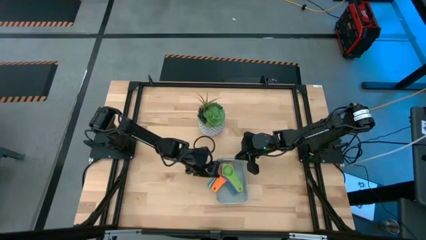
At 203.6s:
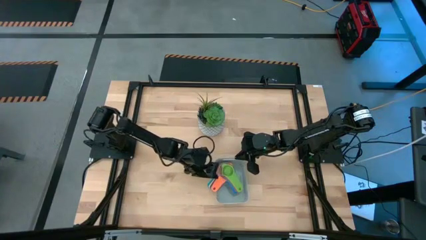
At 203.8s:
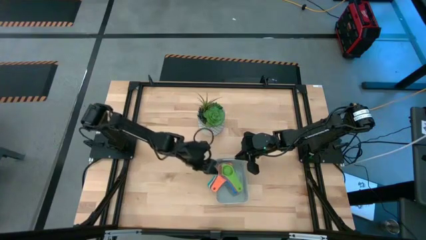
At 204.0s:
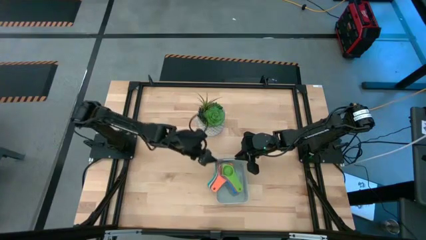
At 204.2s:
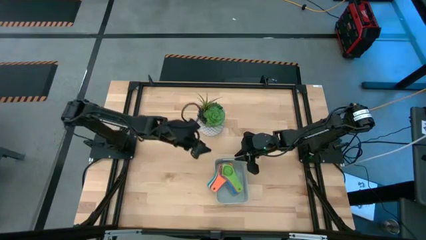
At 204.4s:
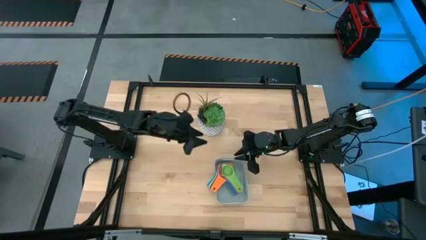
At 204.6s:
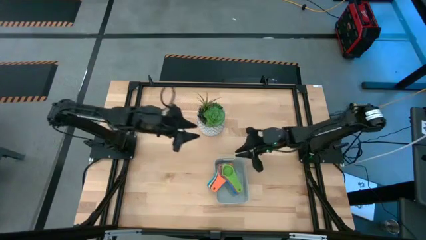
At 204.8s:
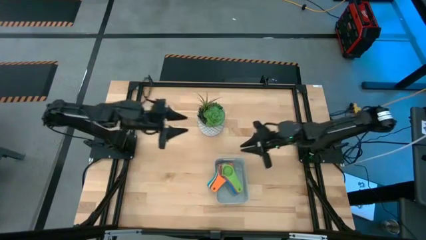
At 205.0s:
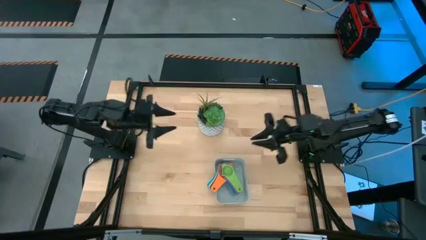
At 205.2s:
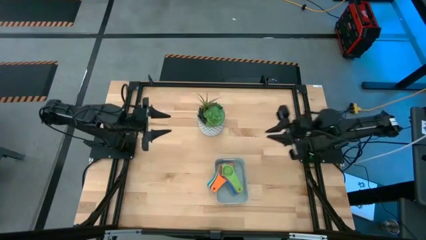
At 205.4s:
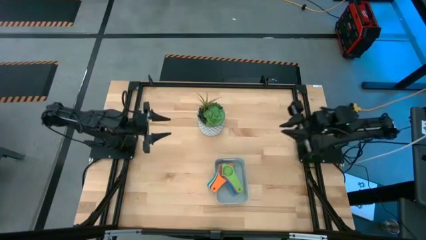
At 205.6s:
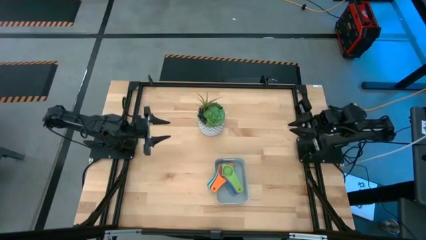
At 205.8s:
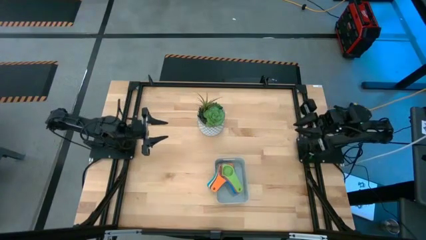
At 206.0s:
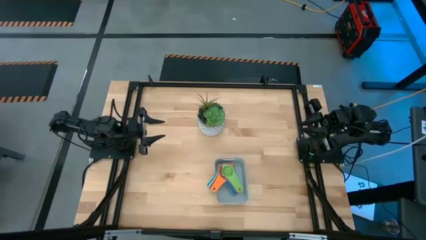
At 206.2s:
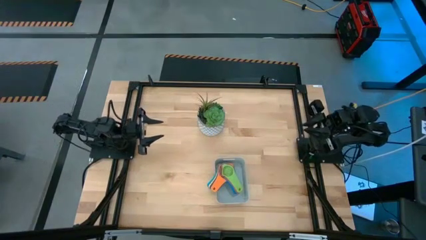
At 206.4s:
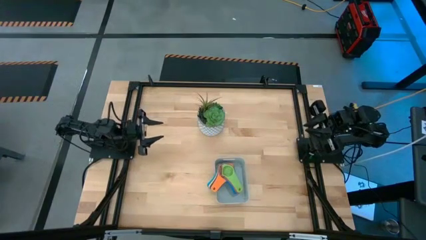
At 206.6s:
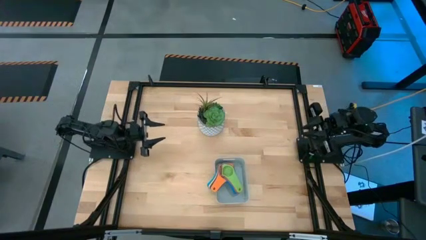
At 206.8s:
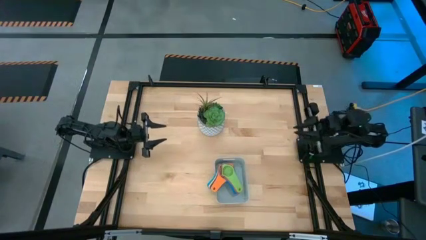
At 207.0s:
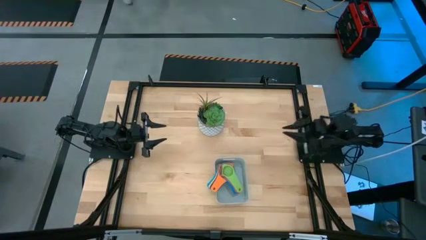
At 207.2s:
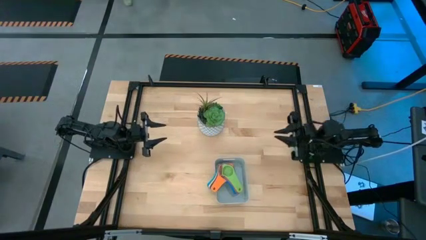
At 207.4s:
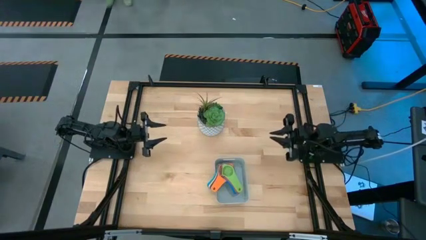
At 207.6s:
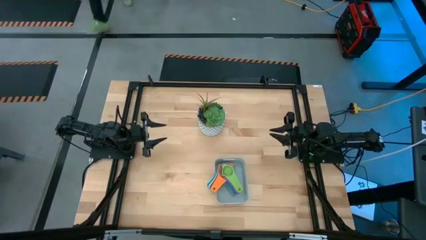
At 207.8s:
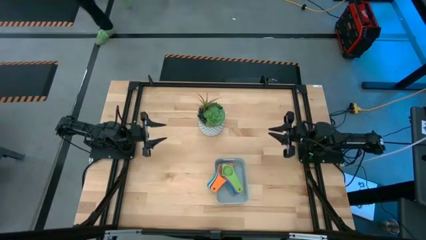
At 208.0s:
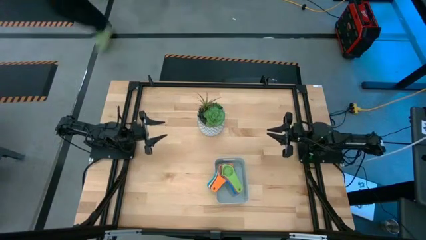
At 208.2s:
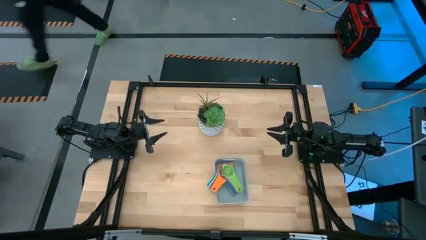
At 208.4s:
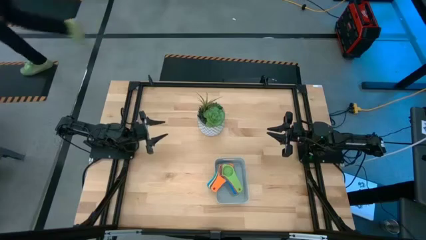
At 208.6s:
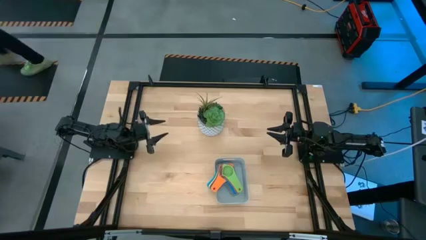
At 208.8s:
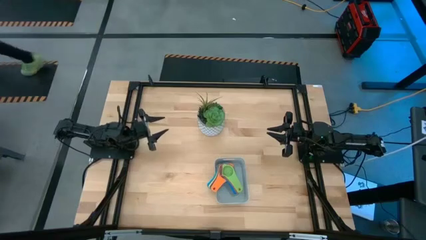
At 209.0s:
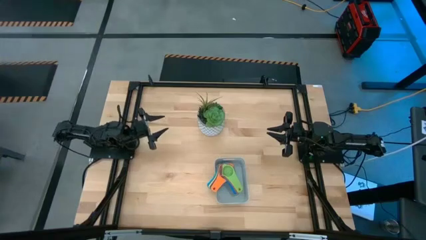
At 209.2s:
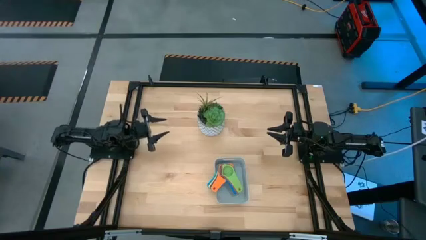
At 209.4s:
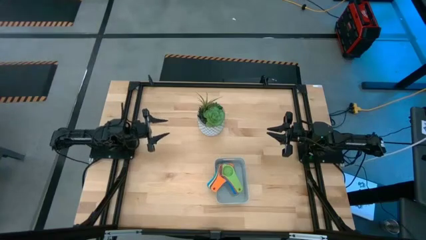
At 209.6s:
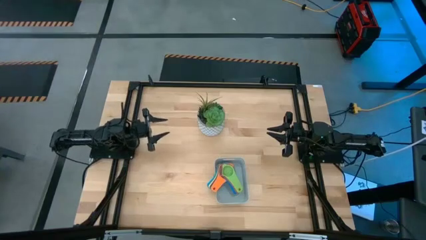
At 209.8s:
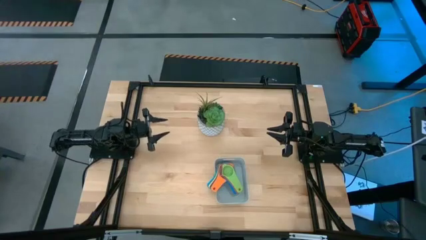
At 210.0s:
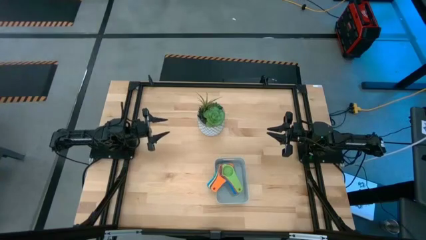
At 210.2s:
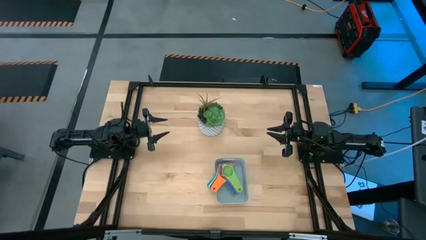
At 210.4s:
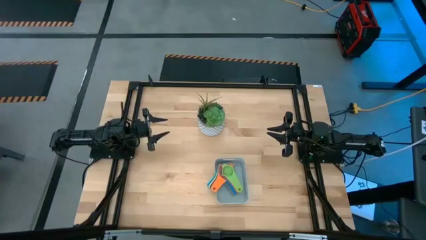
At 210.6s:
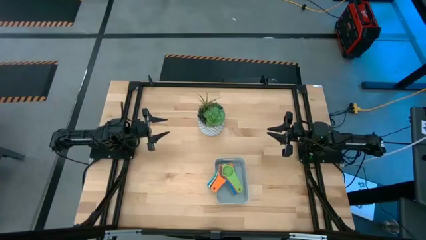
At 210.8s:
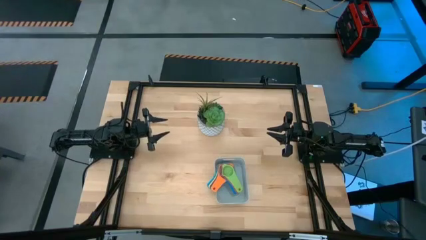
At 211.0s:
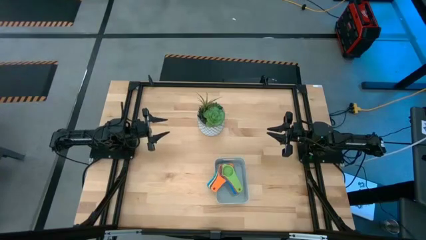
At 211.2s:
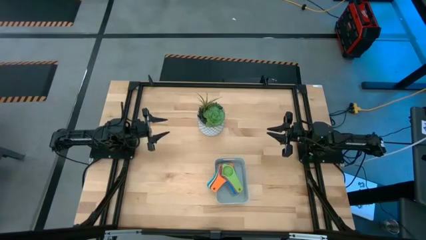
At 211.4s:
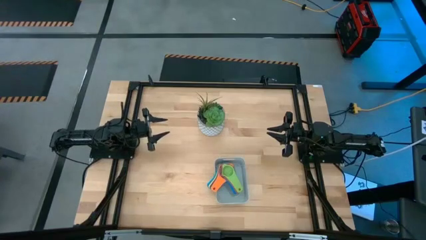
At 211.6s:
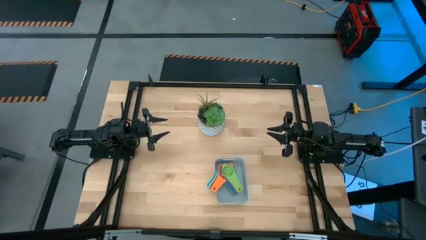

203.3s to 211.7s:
Task: Nest measuring cups in basket
Return to Home Position

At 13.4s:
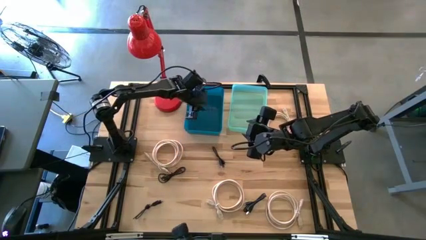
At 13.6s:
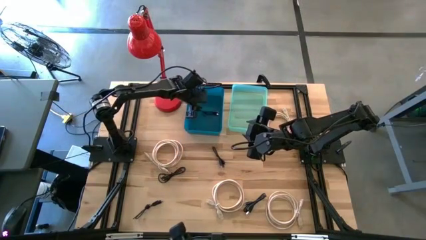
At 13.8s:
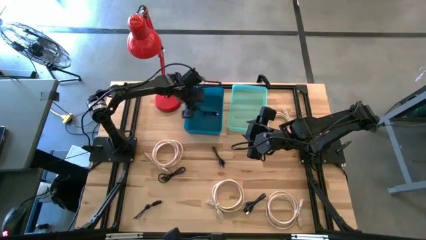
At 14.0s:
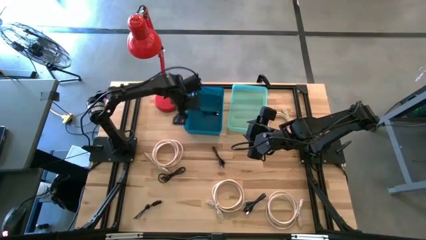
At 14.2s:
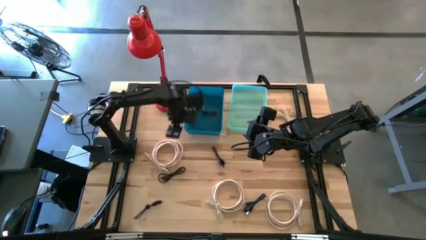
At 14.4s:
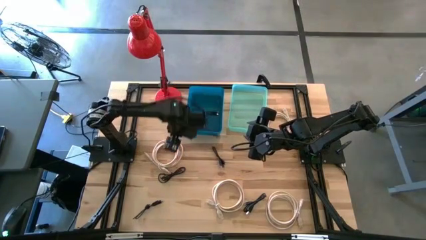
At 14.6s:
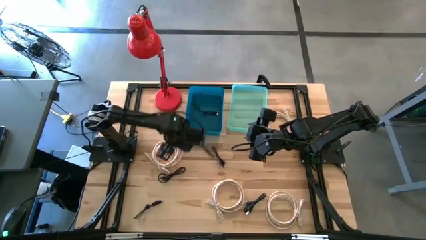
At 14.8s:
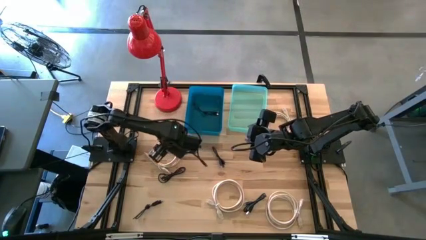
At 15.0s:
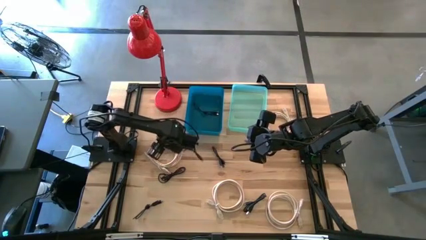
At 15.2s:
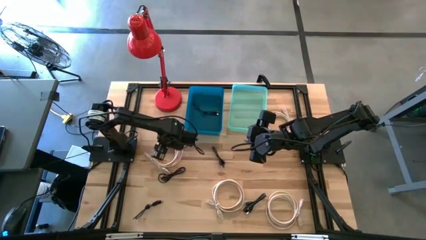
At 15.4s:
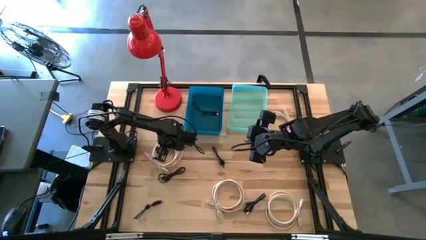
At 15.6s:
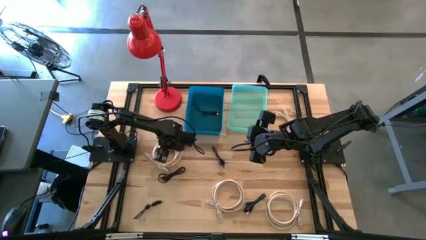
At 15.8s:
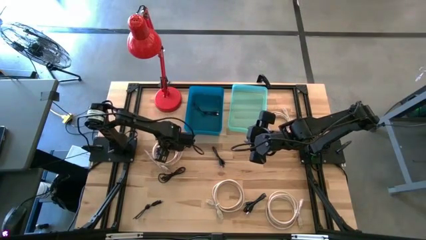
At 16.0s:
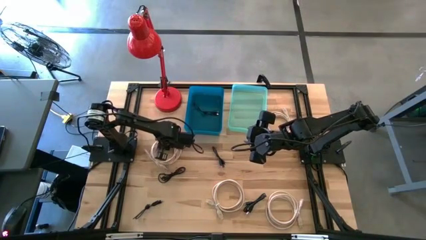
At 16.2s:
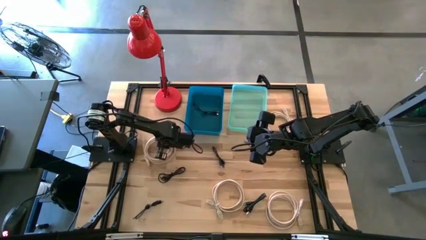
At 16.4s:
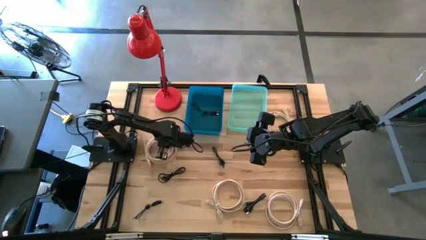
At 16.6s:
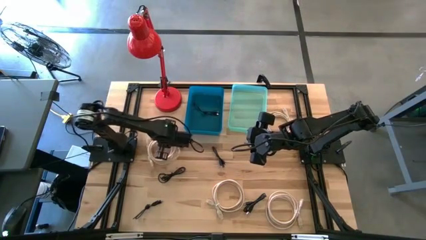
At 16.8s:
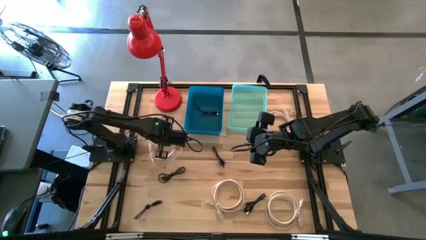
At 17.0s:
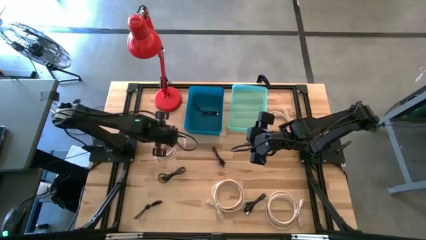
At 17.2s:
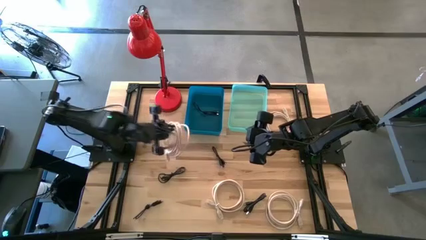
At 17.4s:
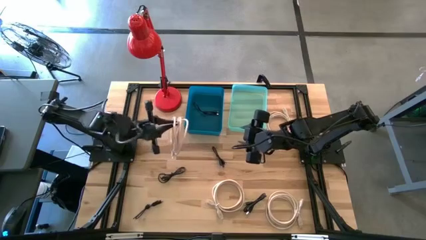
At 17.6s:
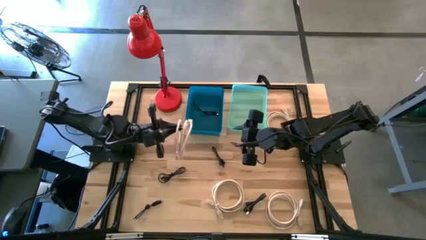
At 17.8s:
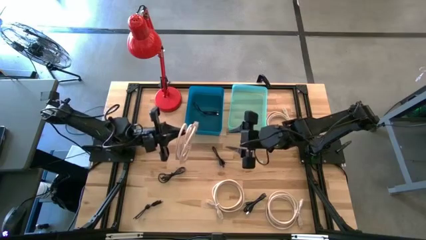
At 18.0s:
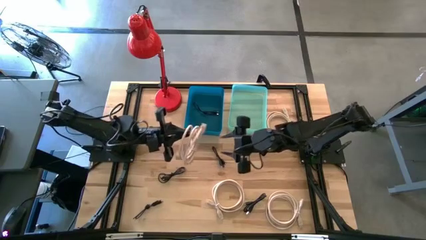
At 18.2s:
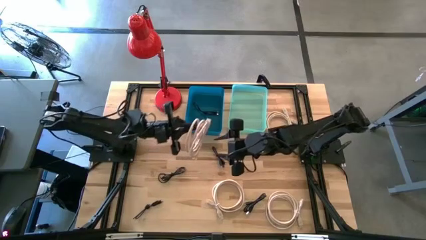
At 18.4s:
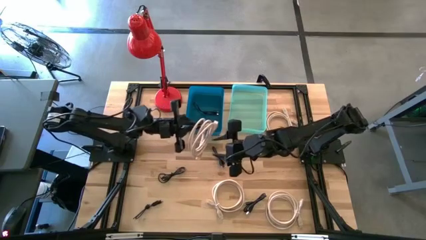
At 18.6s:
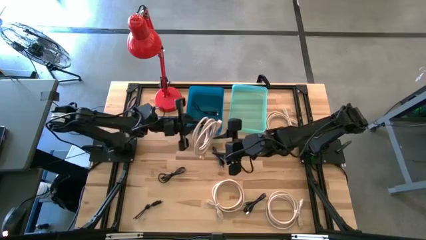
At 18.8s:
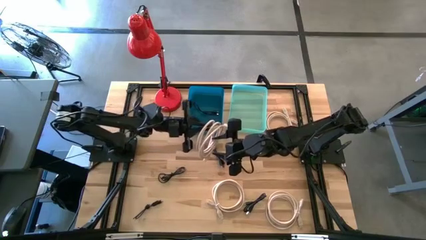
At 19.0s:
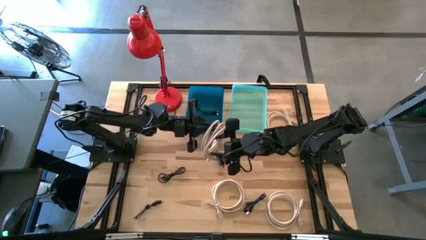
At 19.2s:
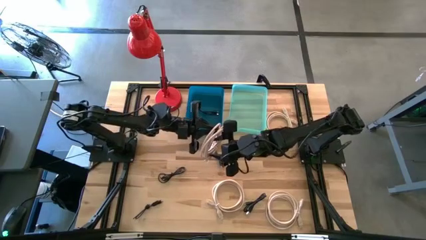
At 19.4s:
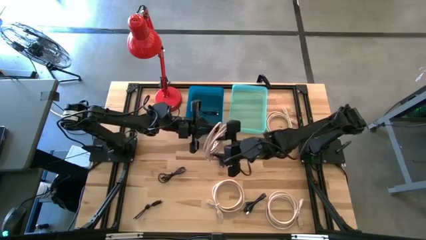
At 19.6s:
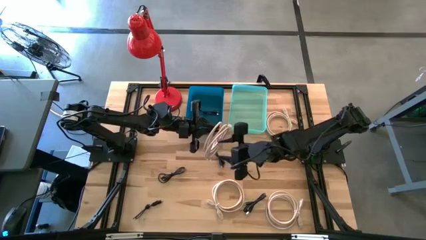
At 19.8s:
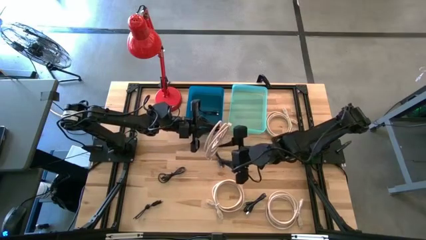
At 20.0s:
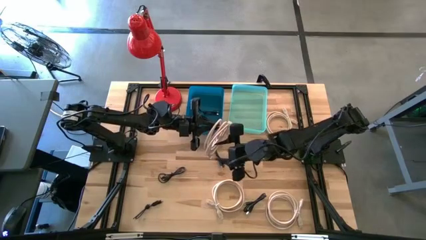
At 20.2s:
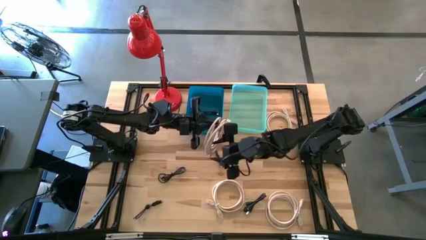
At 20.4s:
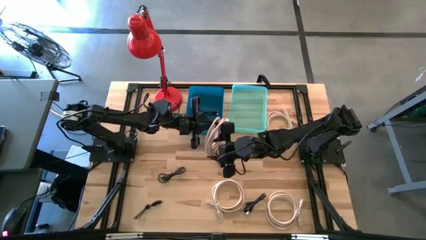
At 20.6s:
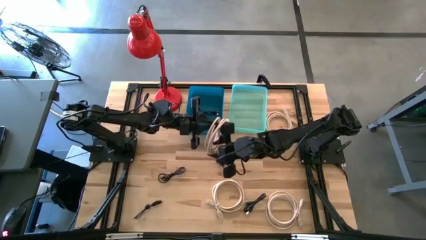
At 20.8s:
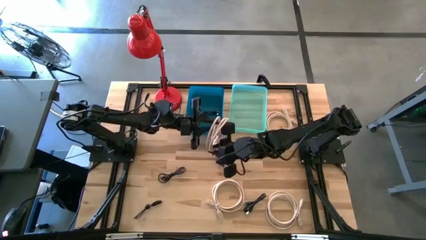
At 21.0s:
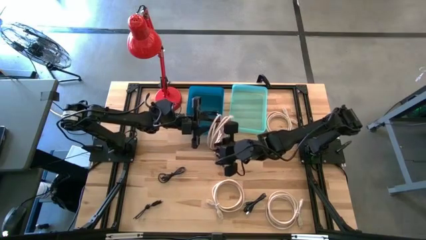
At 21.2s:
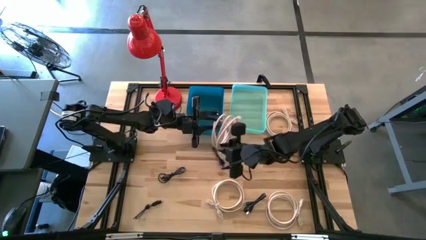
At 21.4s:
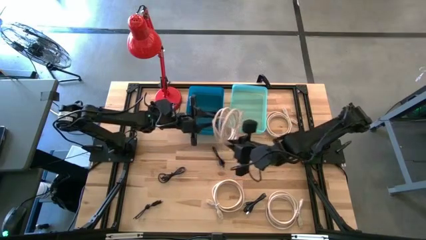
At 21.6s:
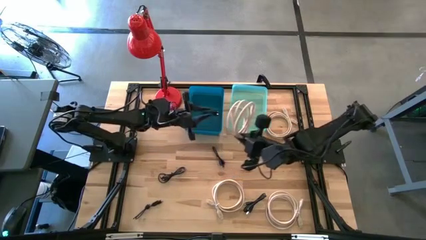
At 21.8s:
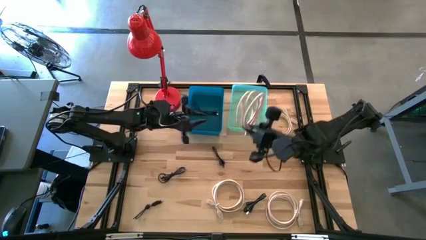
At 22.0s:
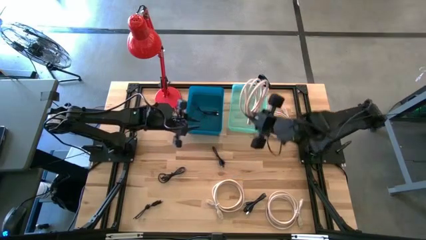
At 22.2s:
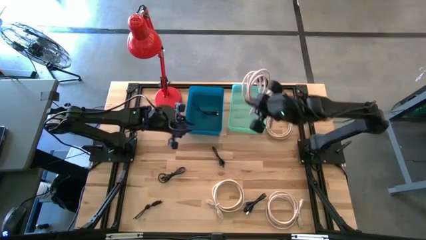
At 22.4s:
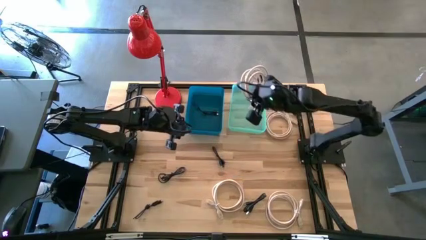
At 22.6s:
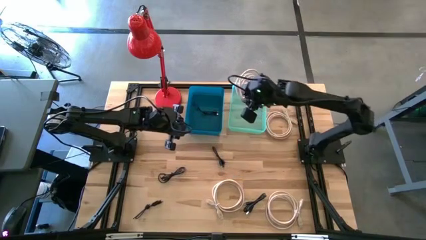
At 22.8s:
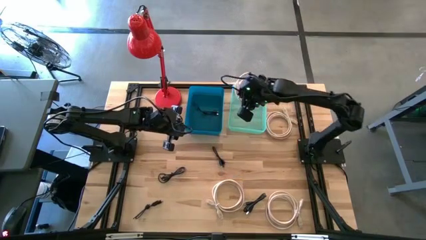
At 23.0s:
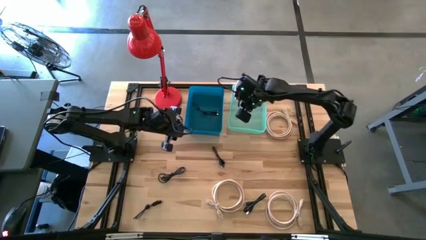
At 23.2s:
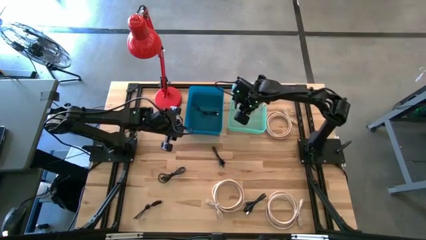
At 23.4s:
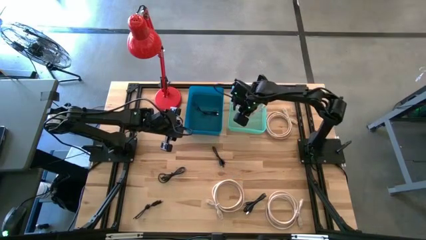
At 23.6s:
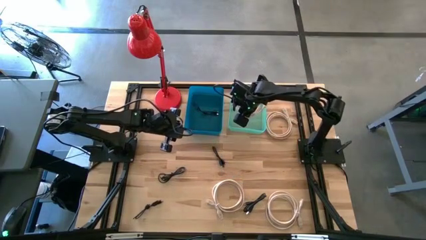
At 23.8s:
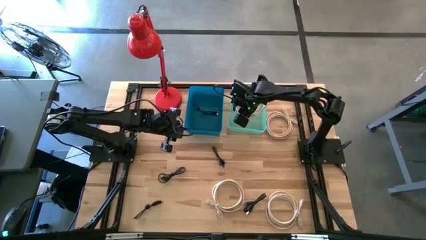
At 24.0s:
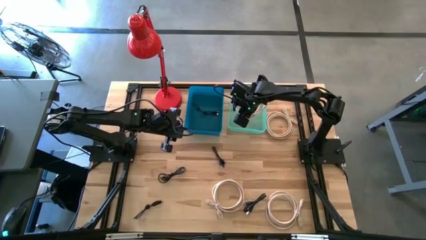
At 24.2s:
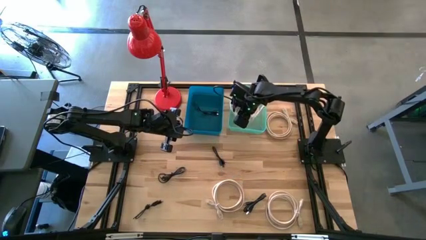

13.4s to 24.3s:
Task: Pick & Place USB Port
Put the light brown hdmi cable into the light green bin
